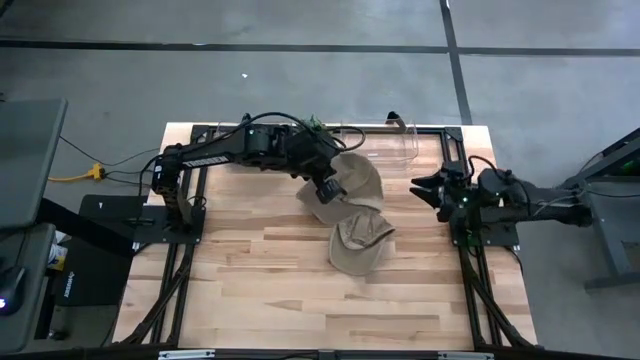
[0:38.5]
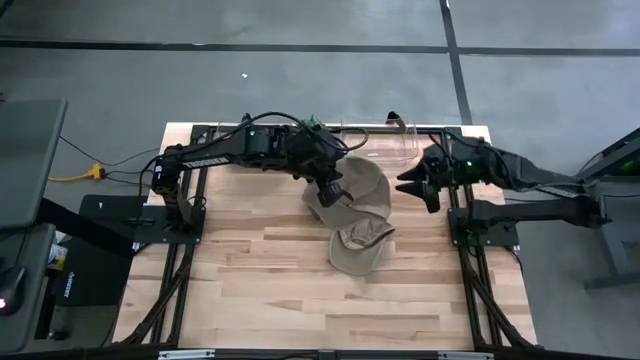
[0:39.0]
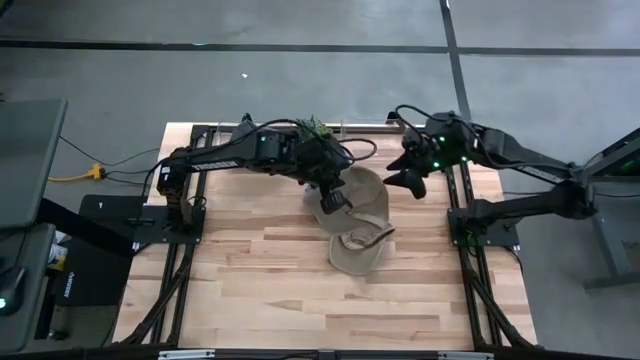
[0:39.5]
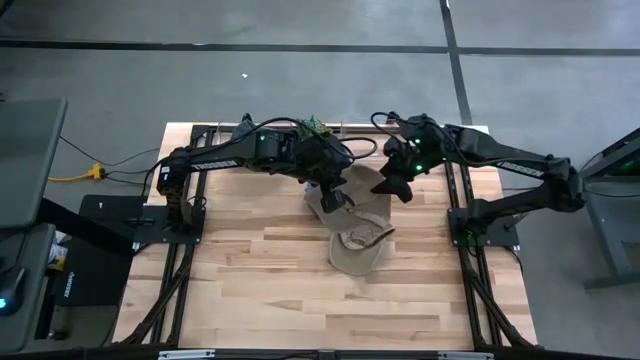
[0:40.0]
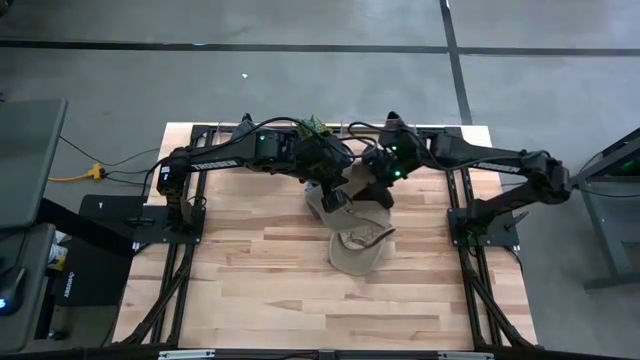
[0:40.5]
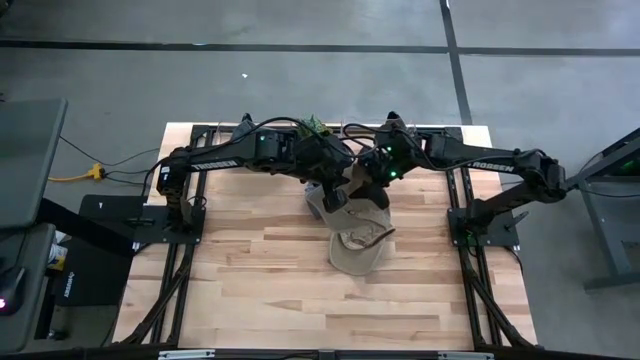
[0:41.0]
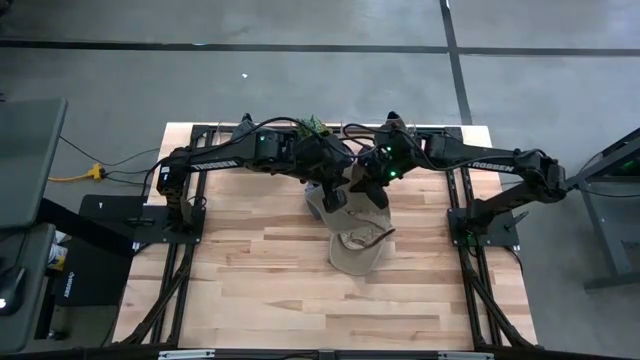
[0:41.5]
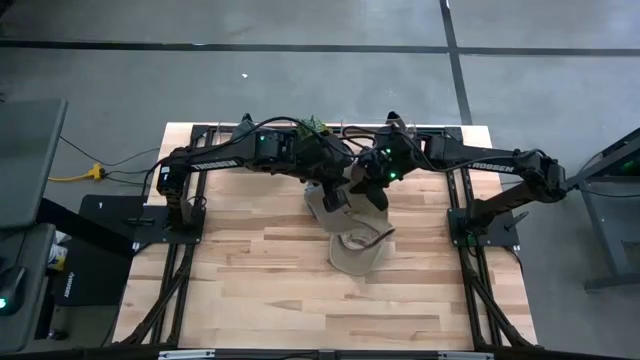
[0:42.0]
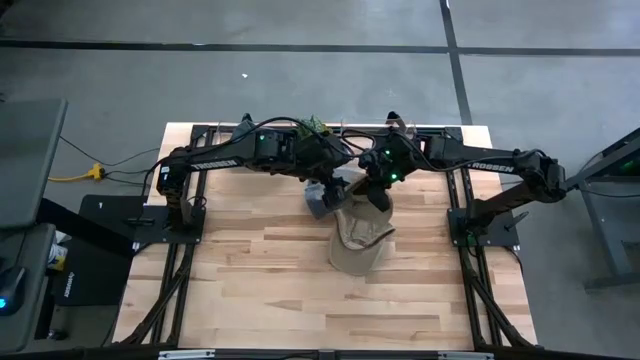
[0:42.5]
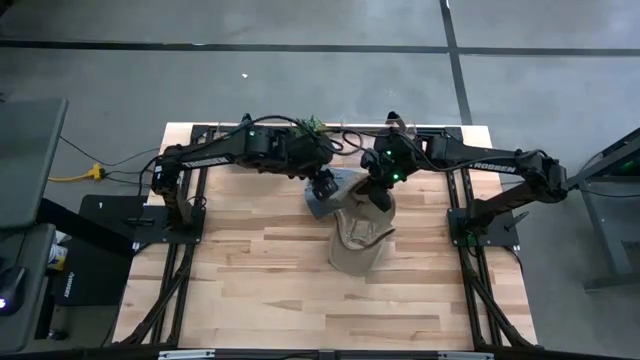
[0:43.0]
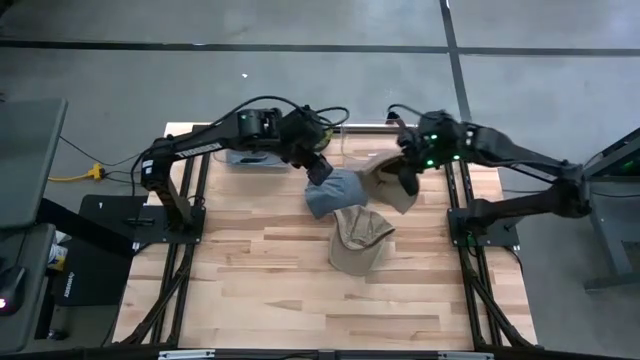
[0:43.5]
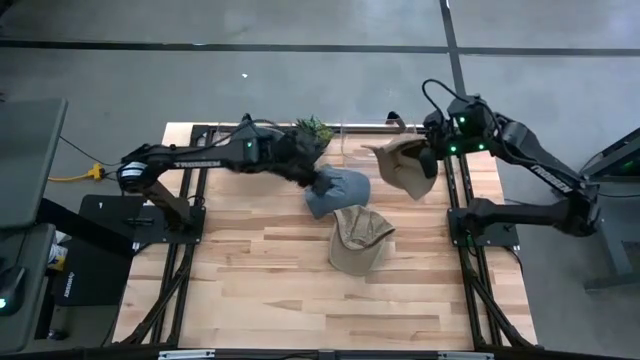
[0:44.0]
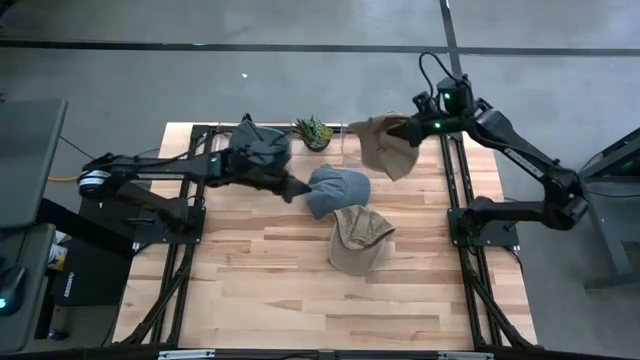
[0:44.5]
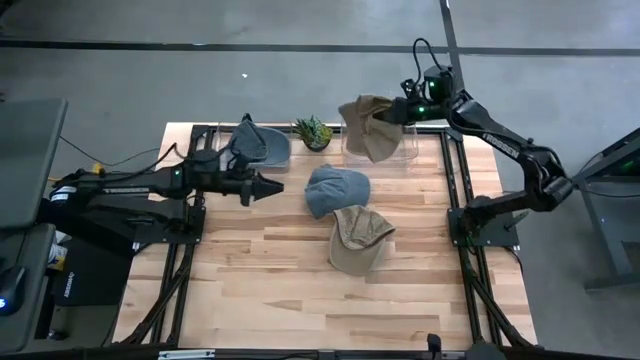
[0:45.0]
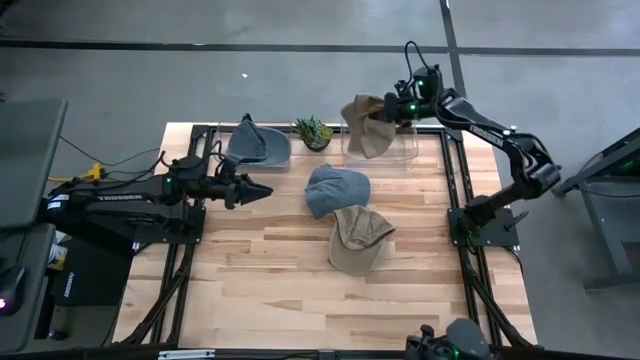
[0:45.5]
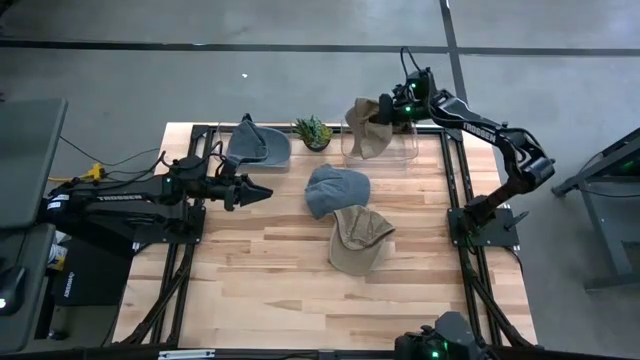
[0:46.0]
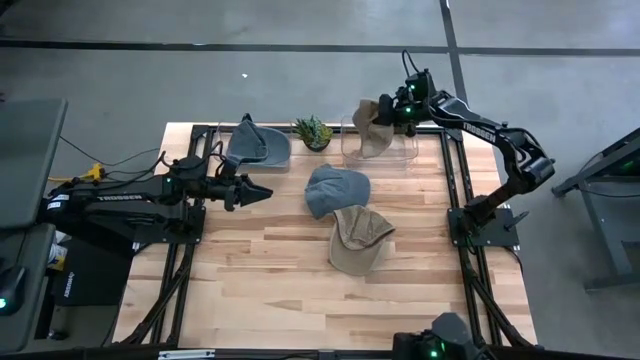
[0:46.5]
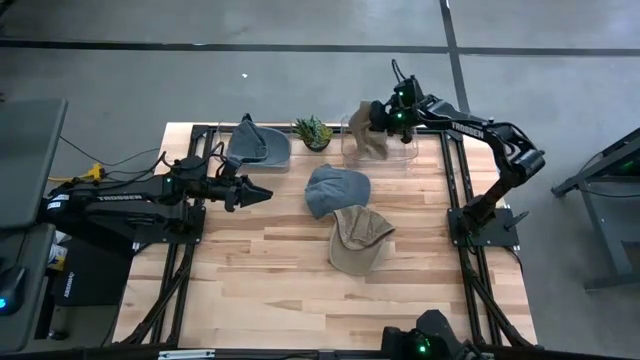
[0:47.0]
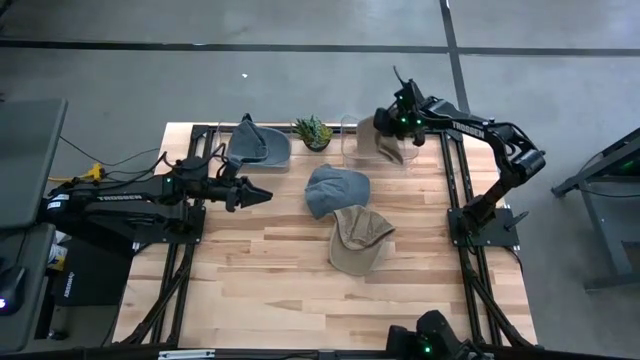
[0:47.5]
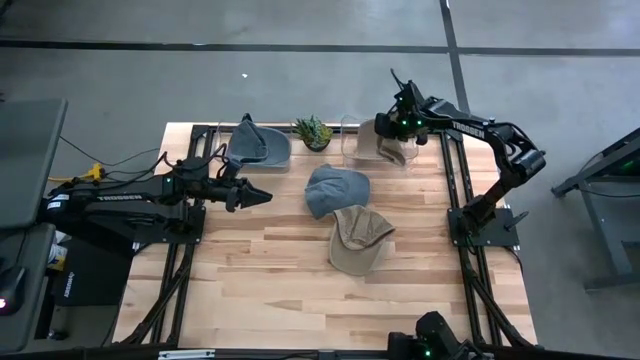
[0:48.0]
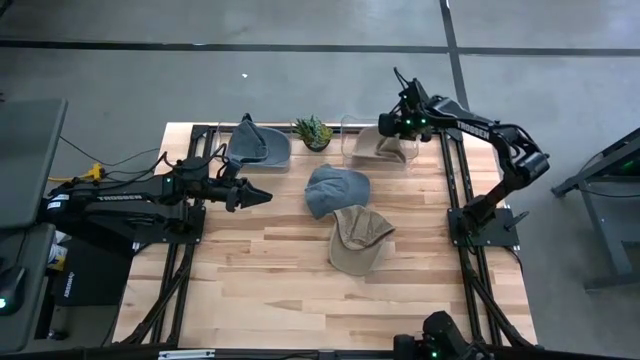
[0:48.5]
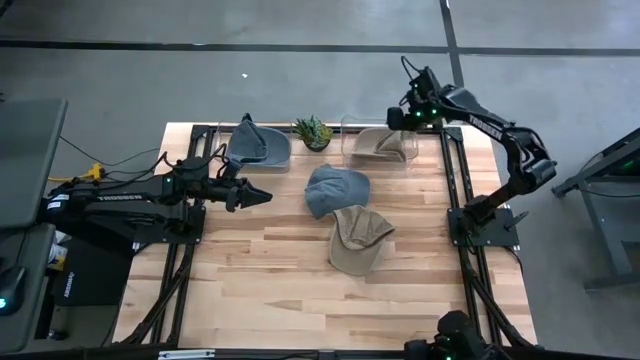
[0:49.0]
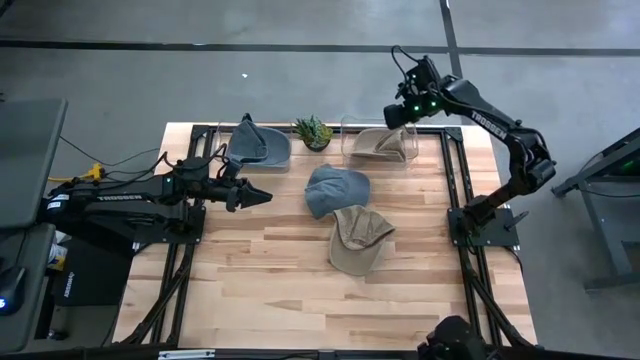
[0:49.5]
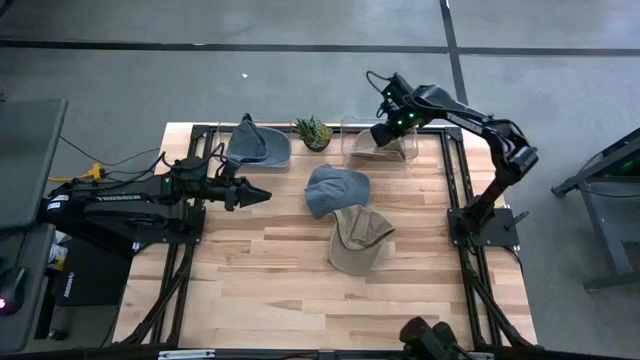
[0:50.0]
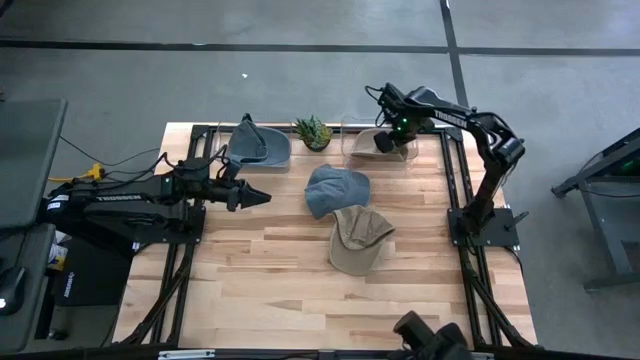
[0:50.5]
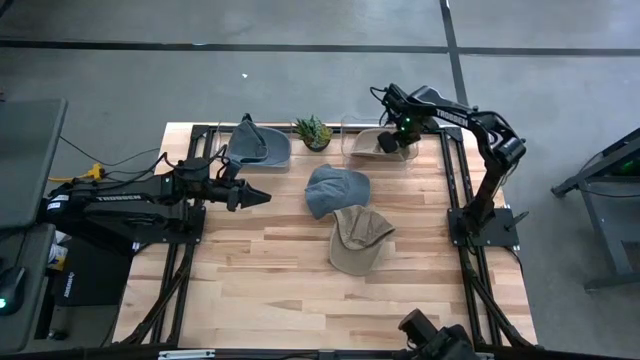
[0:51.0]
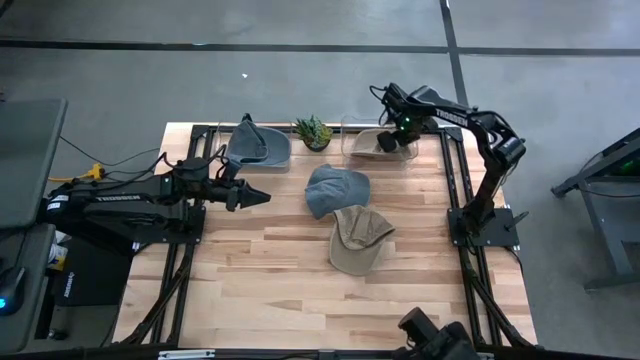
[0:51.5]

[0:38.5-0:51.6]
Task: Pick & Place hat
Put the left brown cap into the right transparent bin

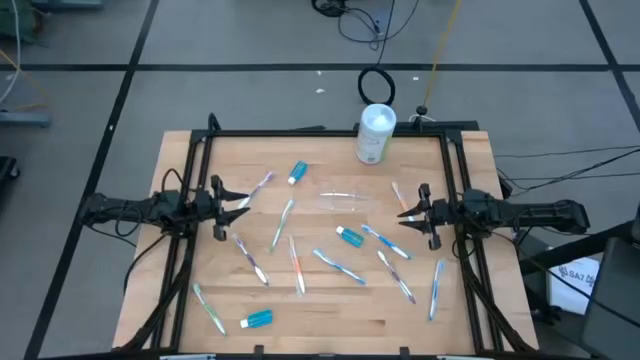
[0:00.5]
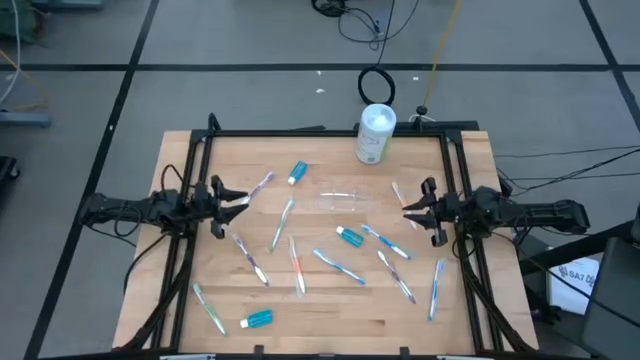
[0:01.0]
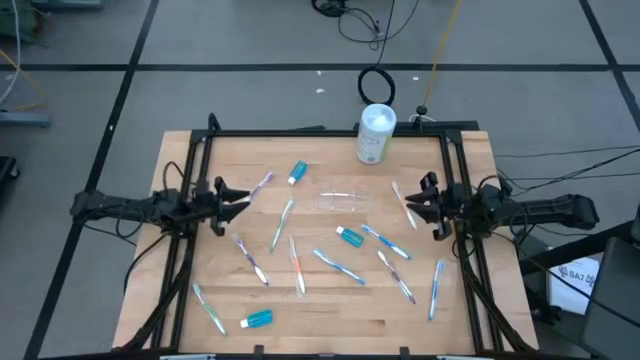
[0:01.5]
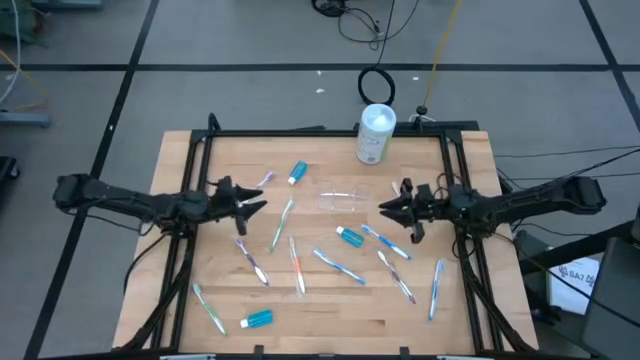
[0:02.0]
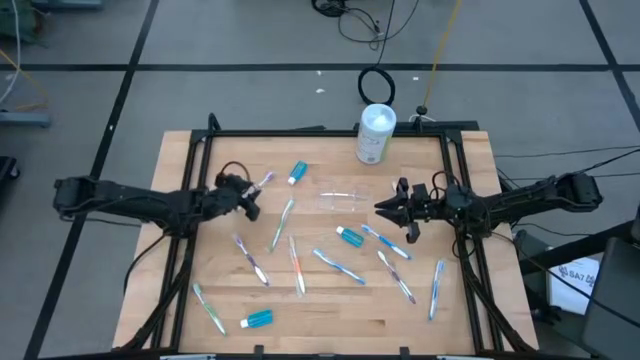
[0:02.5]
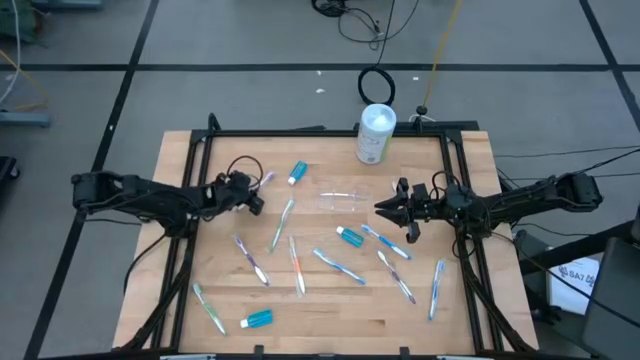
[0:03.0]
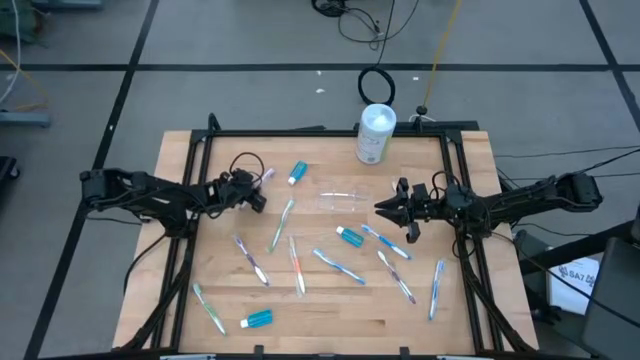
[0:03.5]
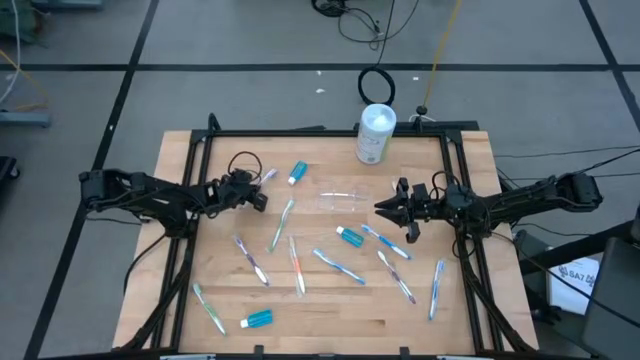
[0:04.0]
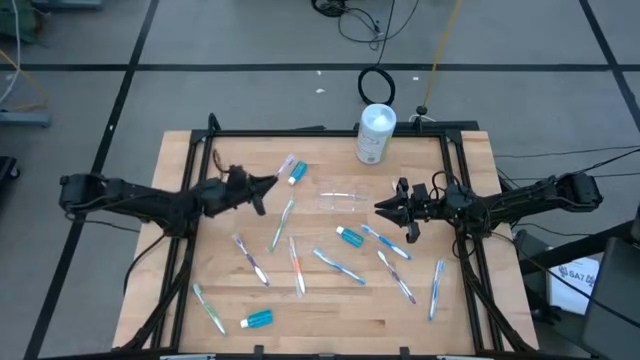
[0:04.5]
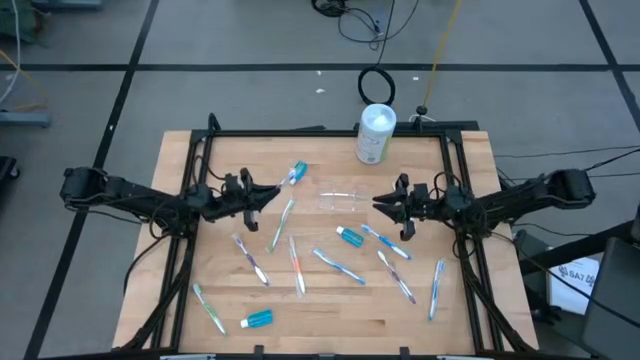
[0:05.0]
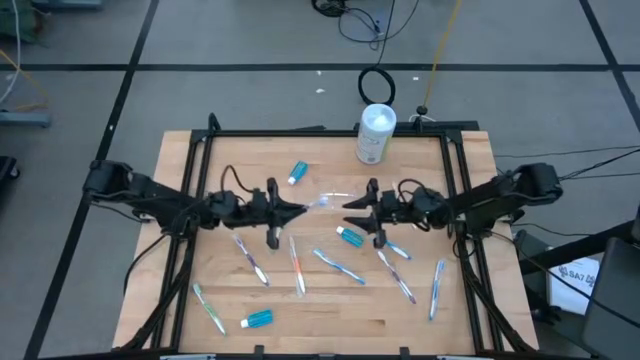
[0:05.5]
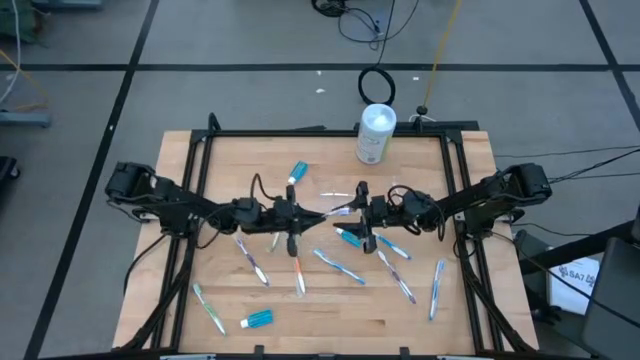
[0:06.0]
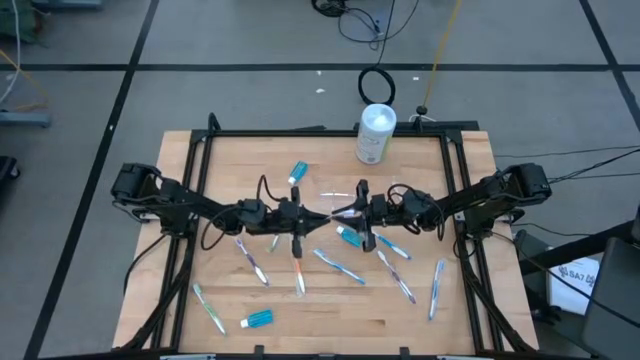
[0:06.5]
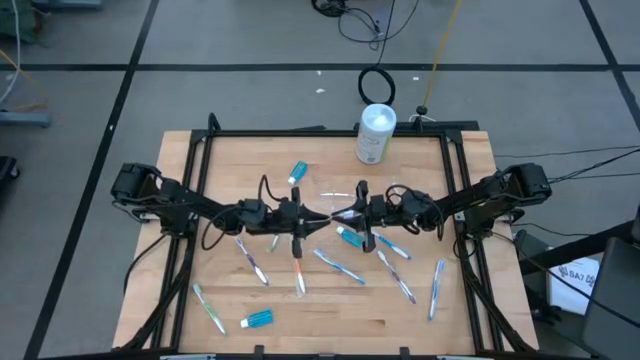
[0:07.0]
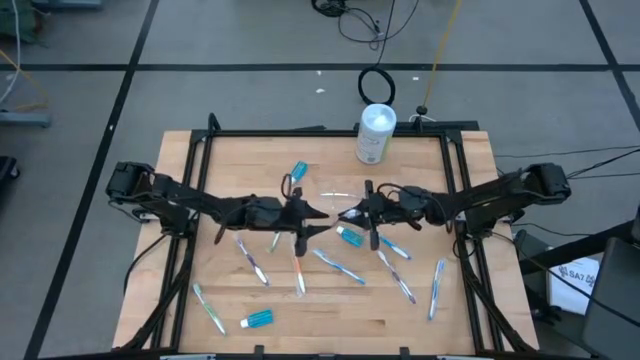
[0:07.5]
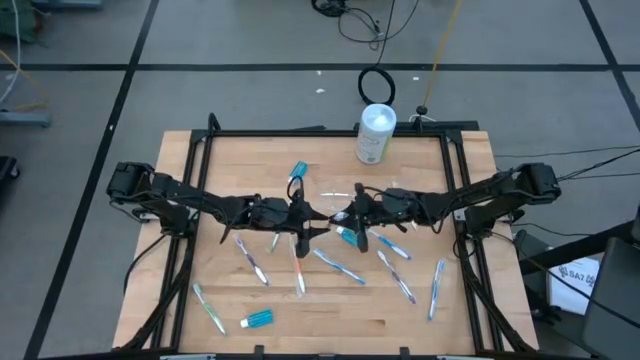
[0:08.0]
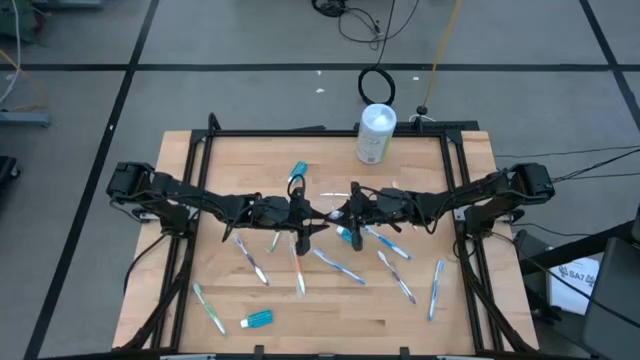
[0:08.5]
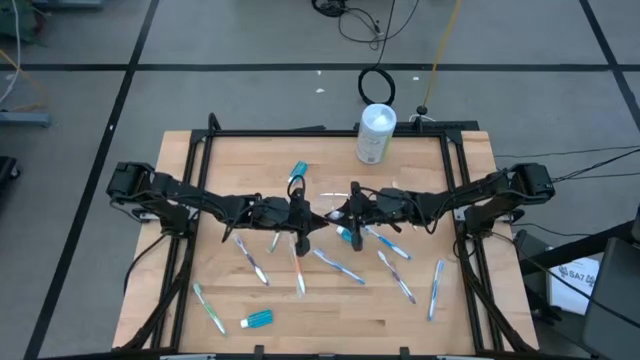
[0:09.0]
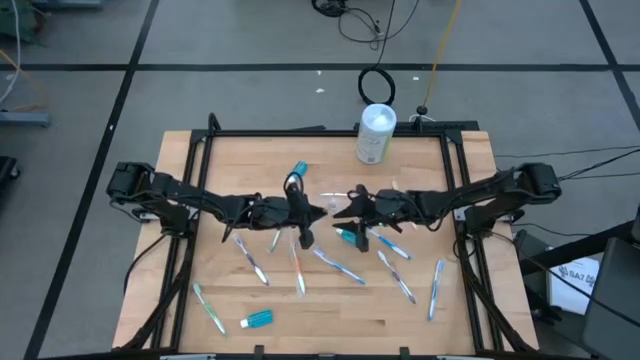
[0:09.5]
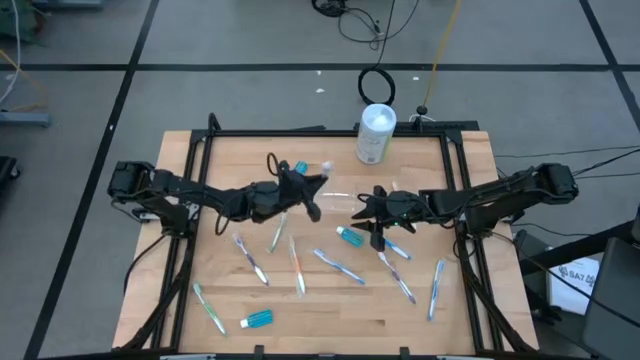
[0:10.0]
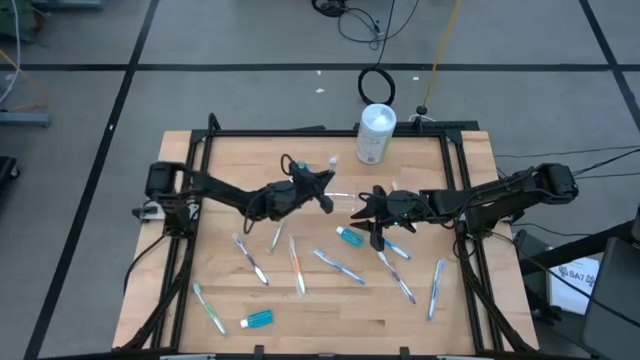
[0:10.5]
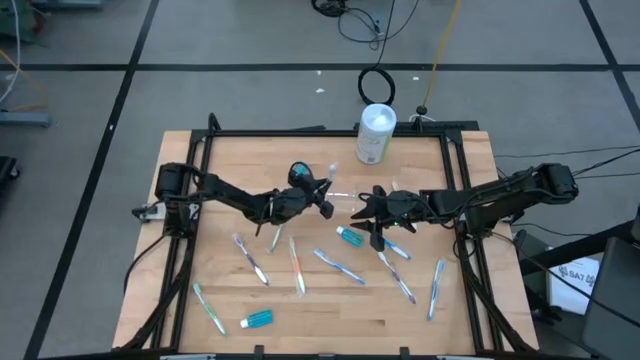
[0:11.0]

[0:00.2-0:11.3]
Task: Pick & Place toothbrushing station
Put the top violet toothbrush into the transparent organizer
